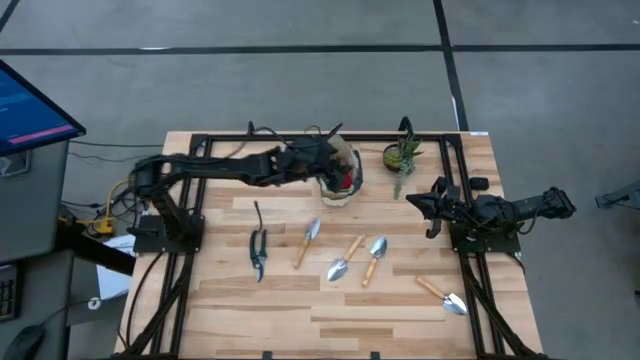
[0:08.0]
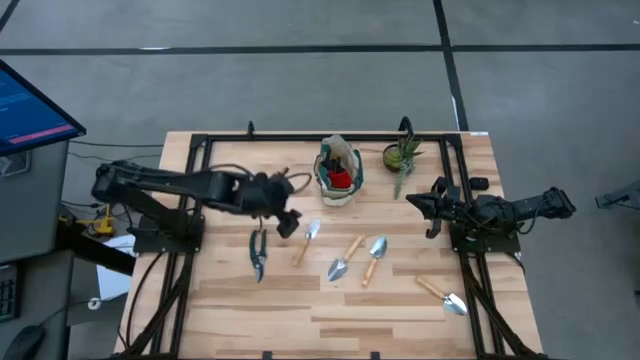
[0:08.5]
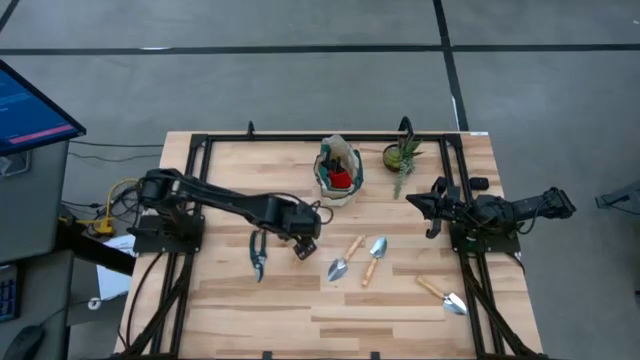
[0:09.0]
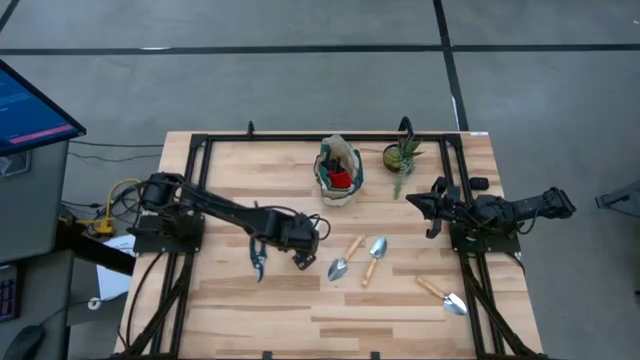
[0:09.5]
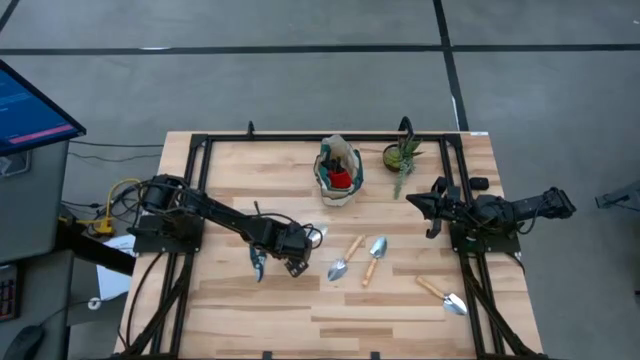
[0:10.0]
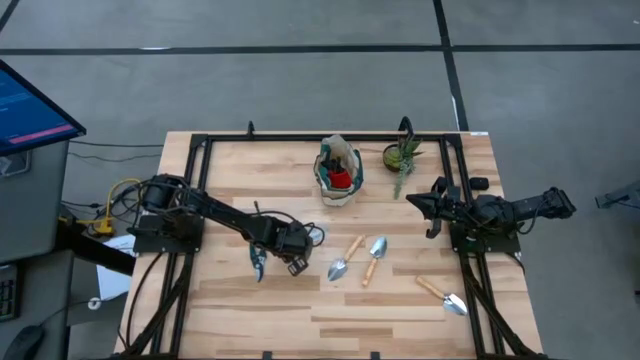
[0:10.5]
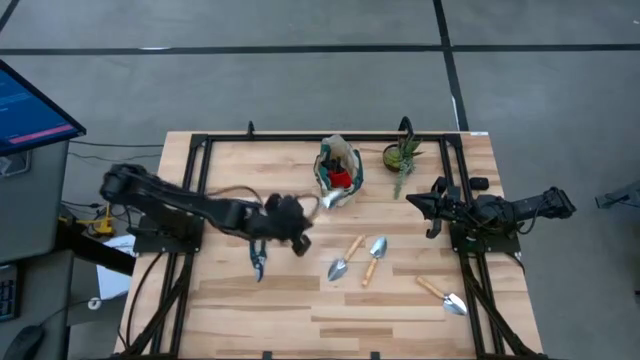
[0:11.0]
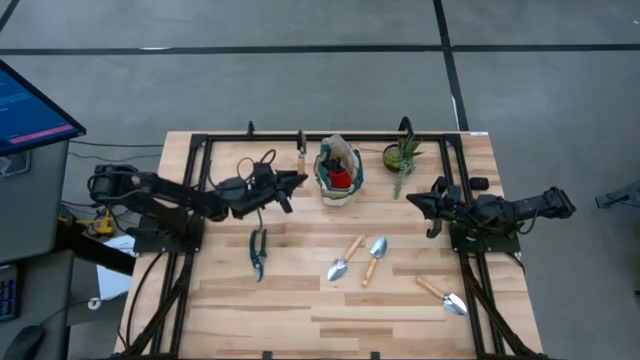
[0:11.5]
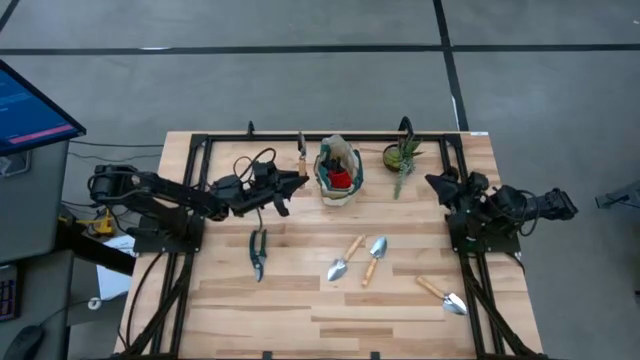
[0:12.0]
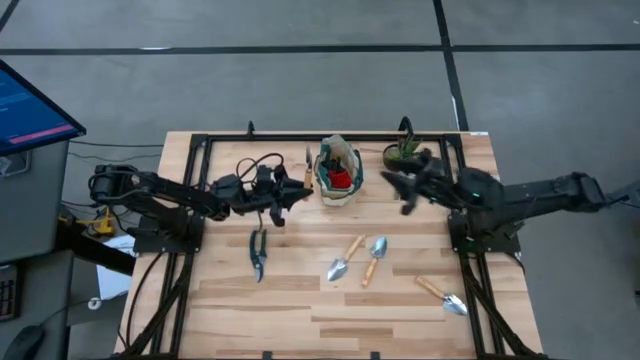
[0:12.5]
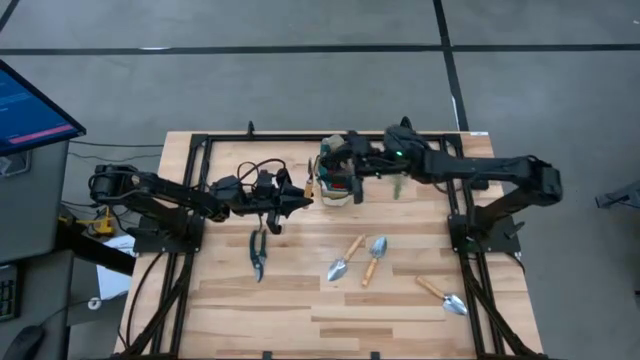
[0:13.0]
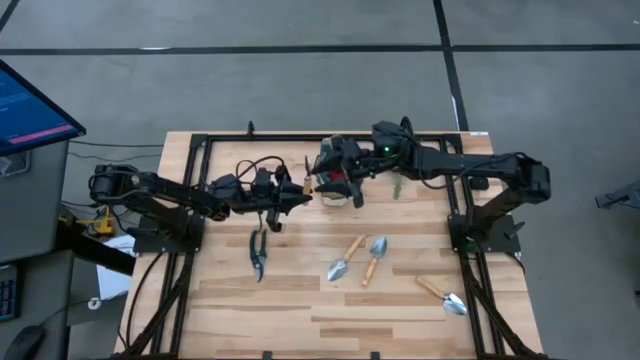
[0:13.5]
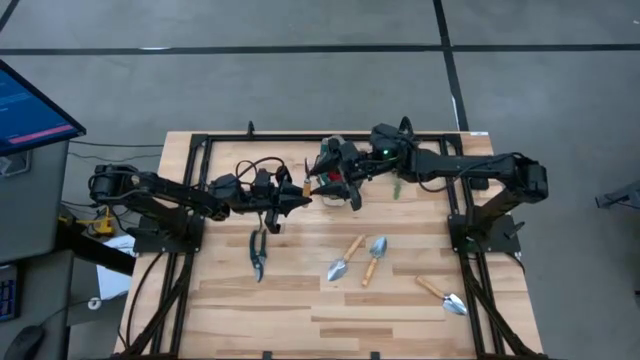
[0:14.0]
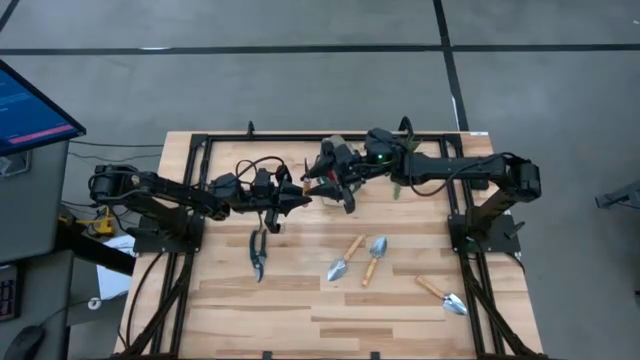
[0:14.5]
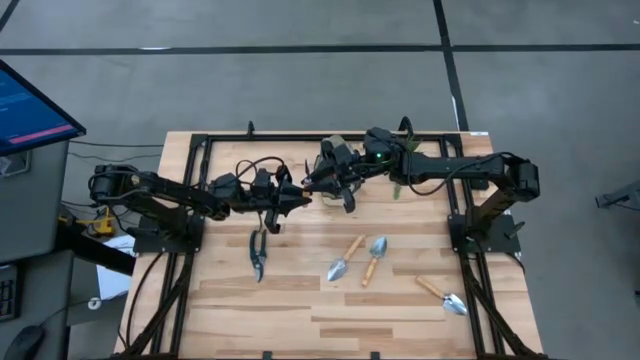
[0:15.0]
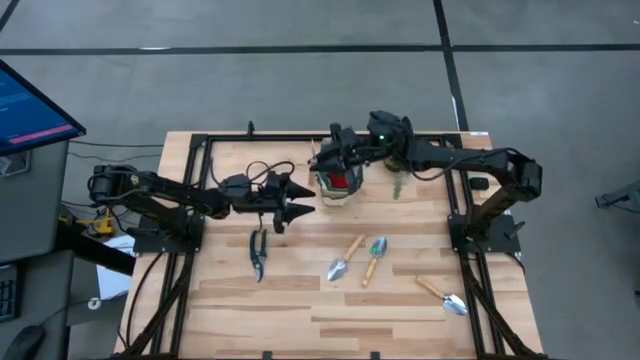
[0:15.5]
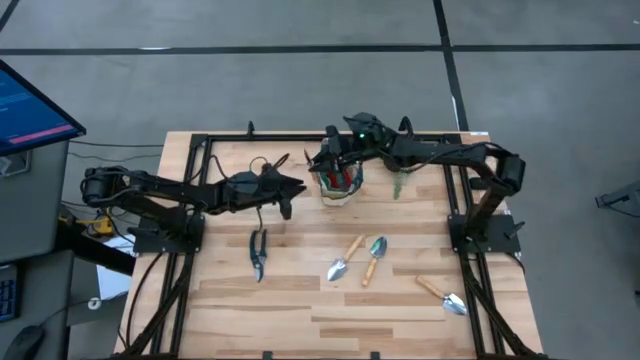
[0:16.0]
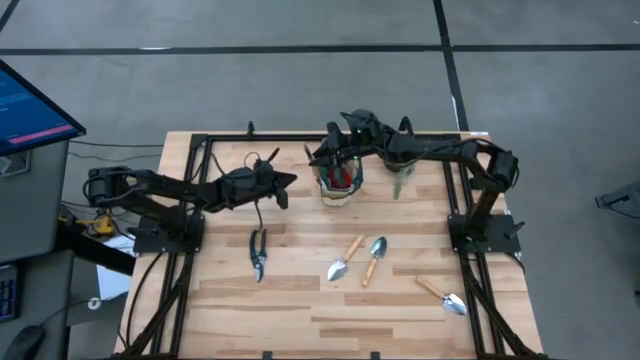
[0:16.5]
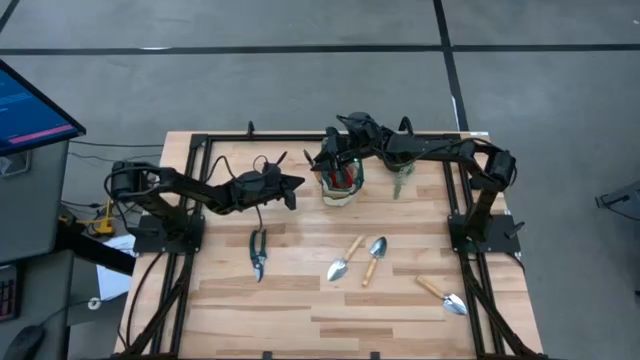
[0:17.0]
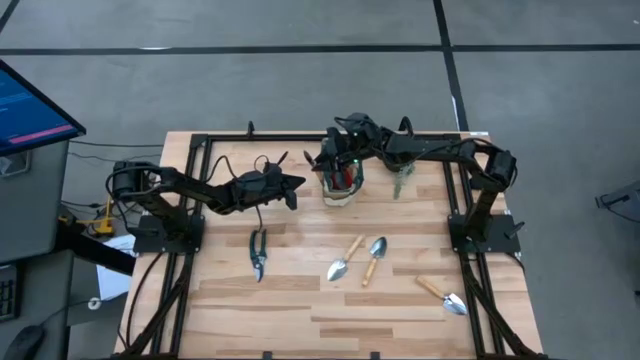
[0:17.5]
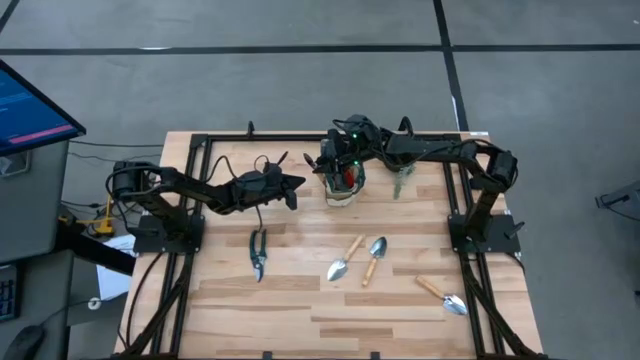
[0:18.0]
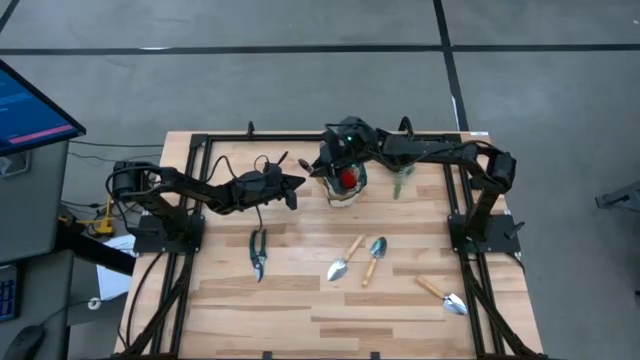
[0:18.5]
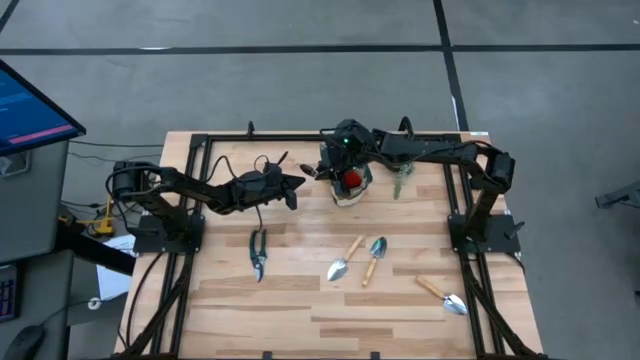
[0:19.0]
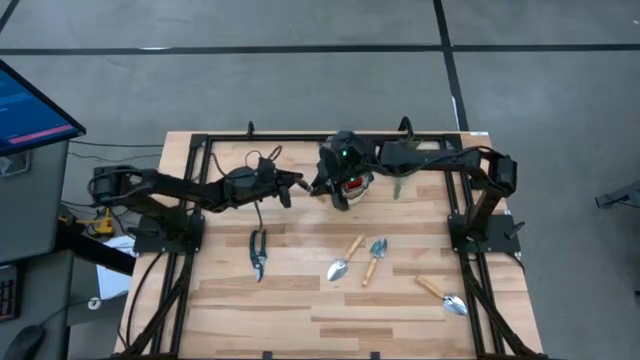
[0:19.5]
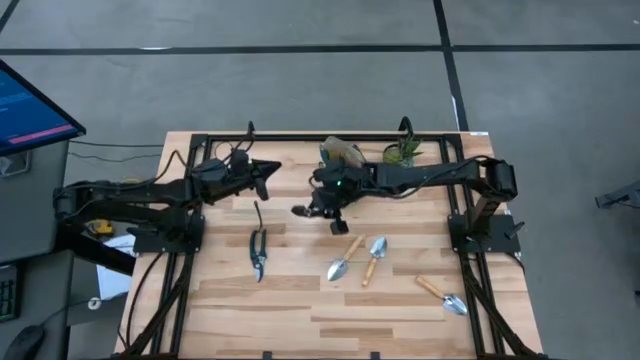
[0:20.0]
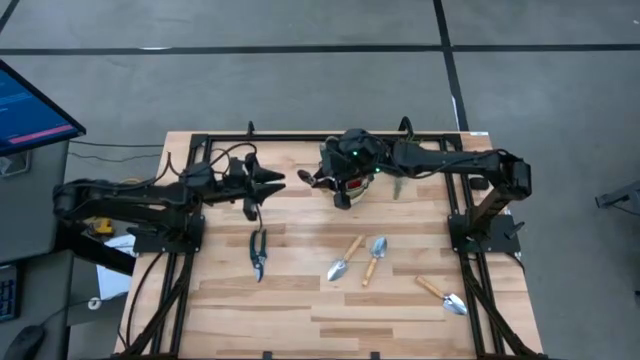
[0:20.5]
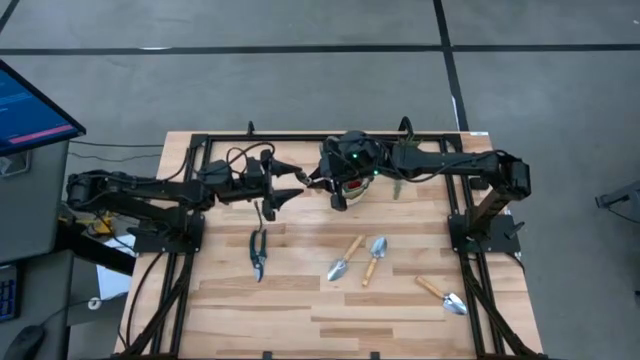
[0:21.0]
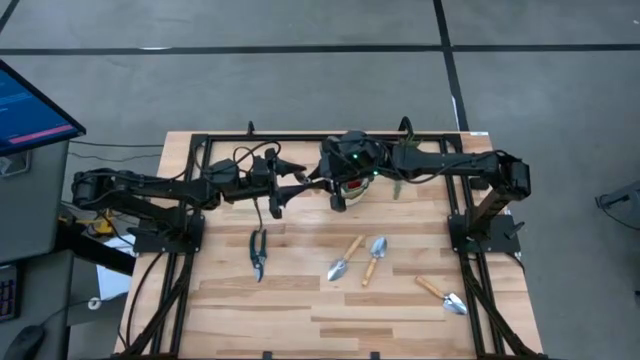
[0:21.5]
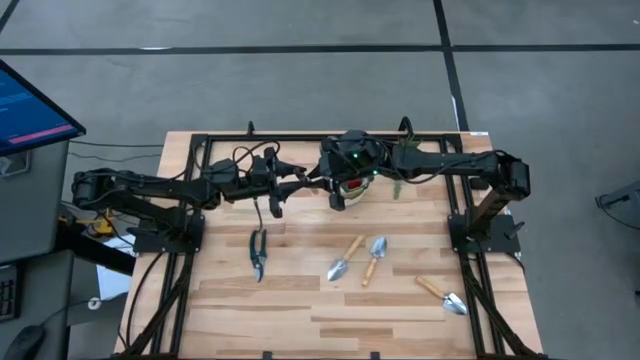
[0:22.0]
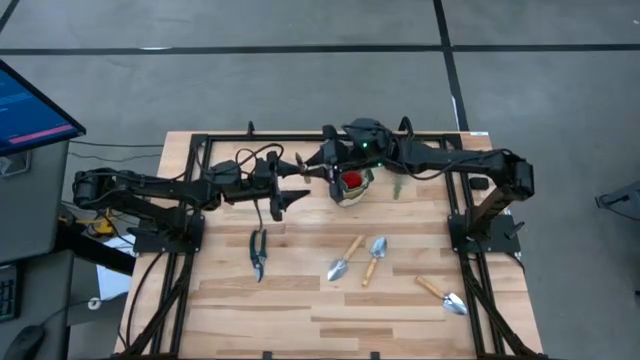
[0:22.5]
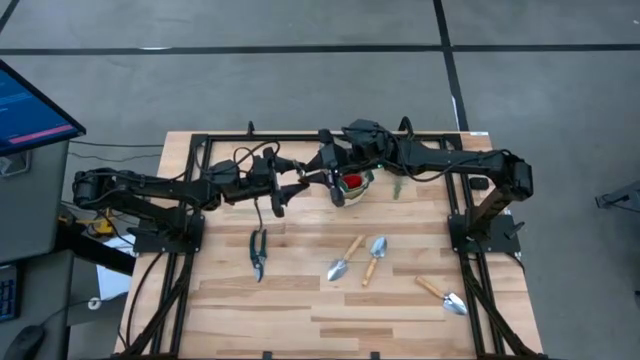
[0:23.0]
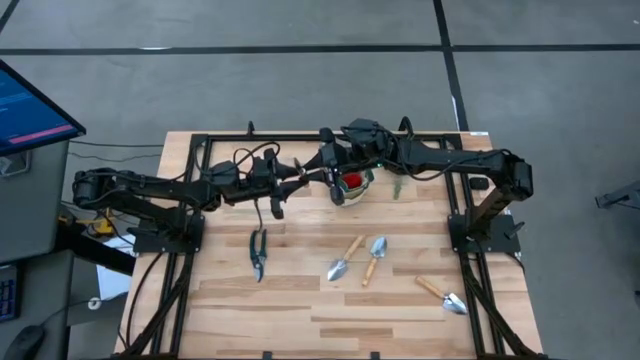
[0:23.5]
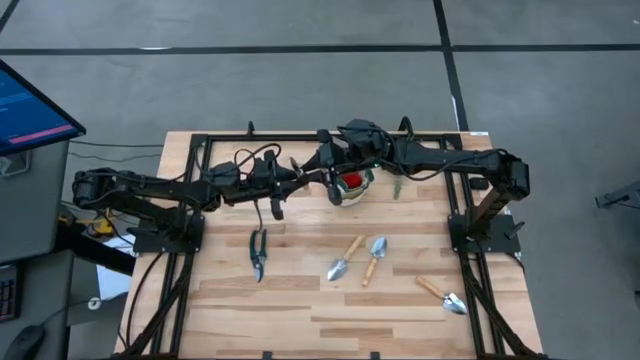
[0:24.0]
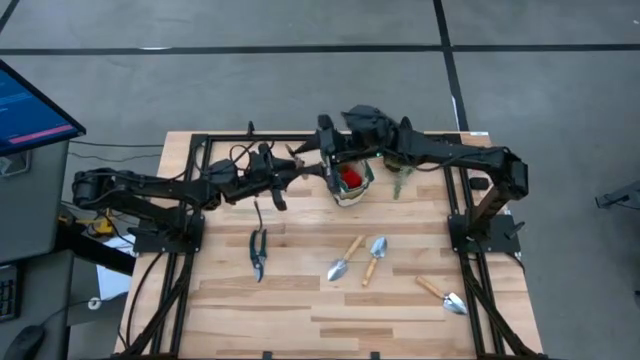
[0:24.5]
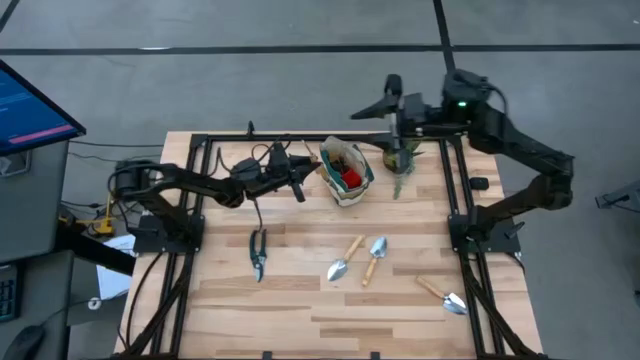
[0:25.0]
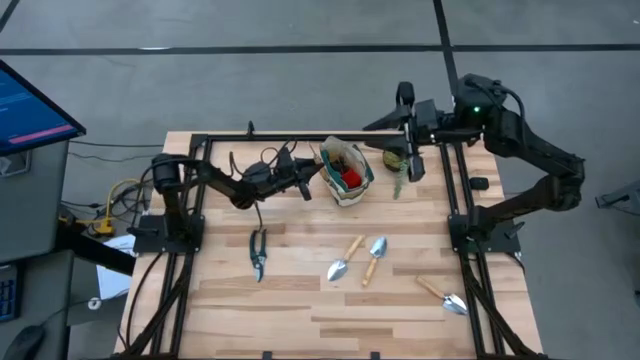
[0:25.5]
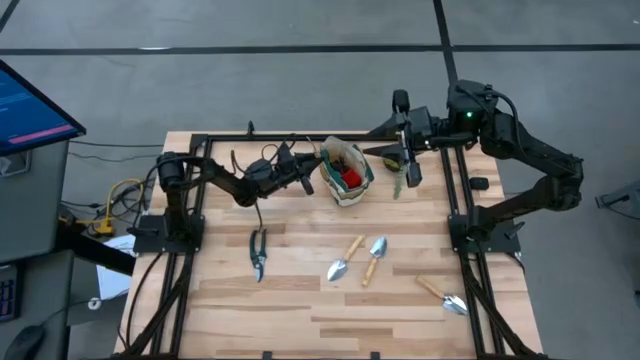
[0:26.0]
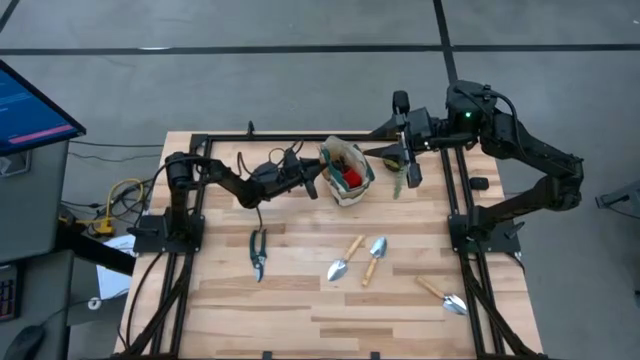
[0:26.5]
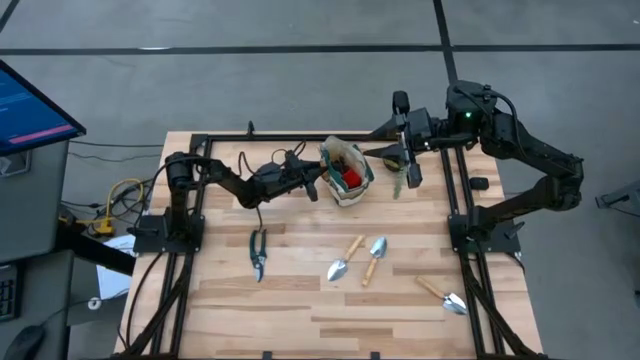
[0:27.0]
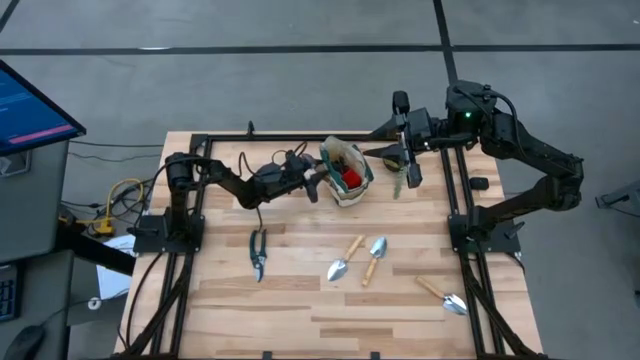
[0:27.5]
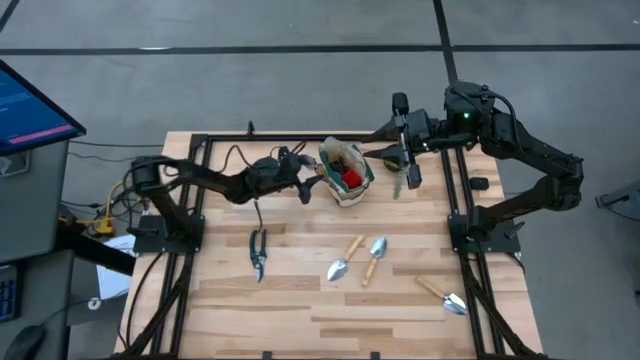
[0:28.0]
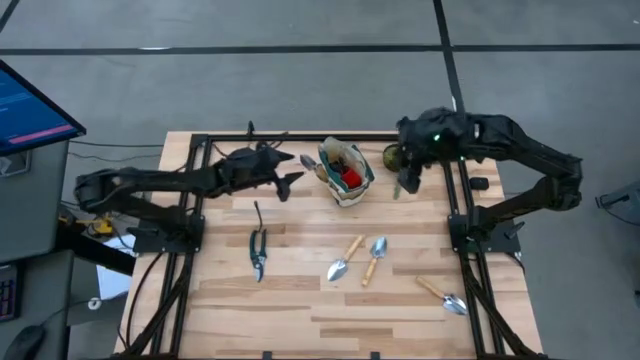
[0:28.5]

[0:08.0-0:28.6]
Task: Pick & Place Garden tools in Gardening bag
Put the brown trowel into the brown gardening bag
